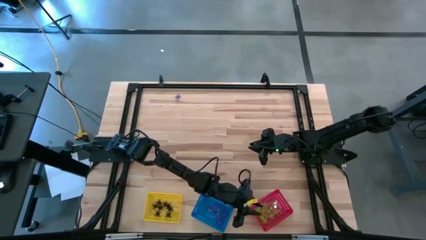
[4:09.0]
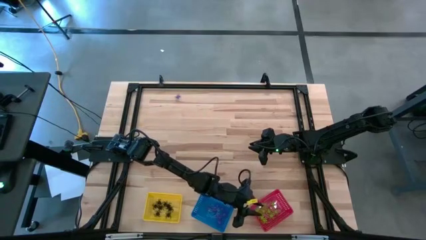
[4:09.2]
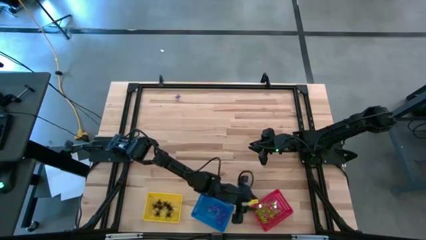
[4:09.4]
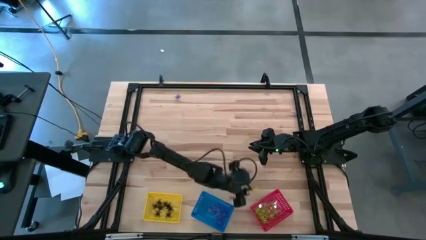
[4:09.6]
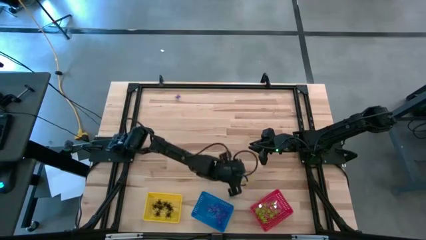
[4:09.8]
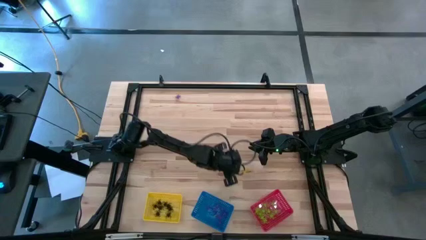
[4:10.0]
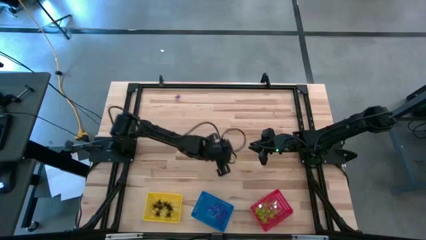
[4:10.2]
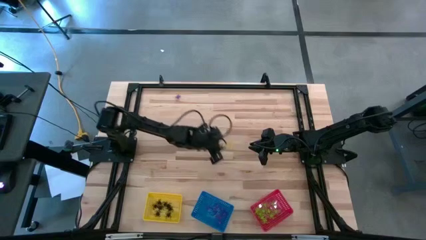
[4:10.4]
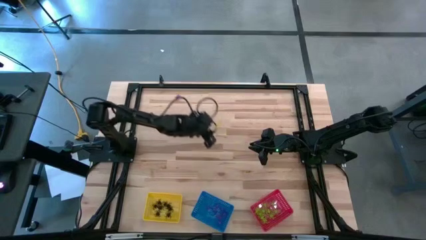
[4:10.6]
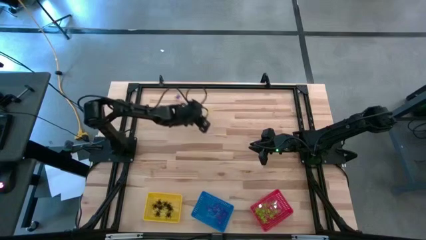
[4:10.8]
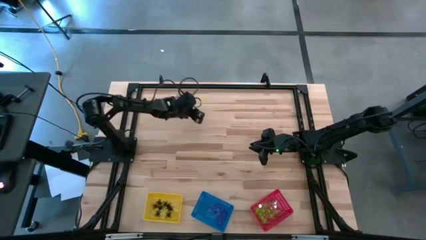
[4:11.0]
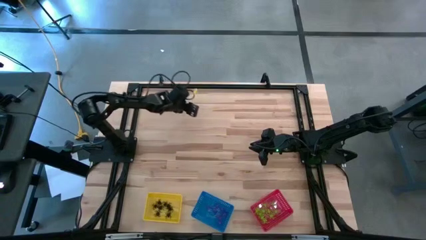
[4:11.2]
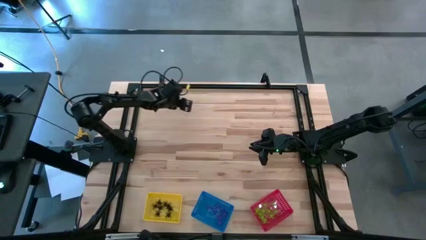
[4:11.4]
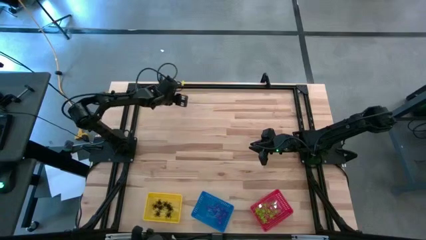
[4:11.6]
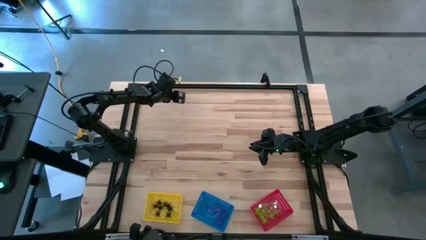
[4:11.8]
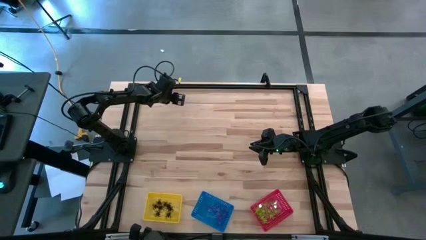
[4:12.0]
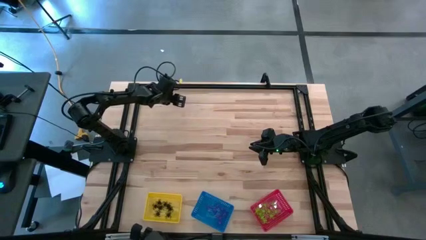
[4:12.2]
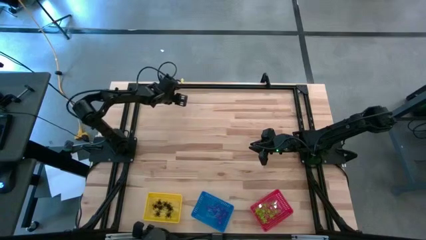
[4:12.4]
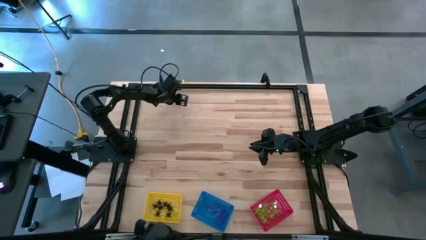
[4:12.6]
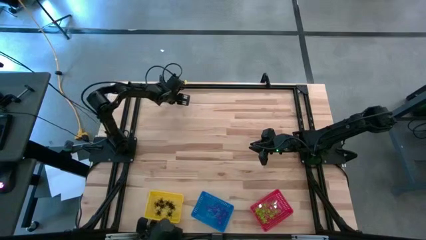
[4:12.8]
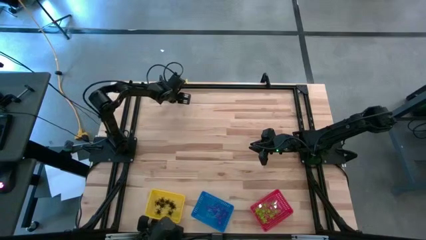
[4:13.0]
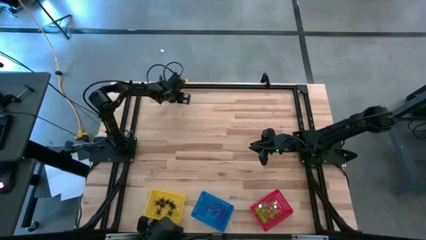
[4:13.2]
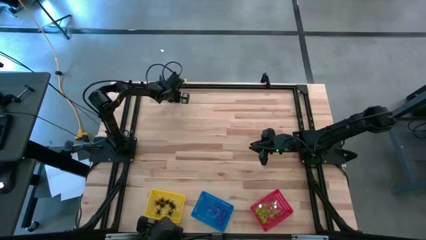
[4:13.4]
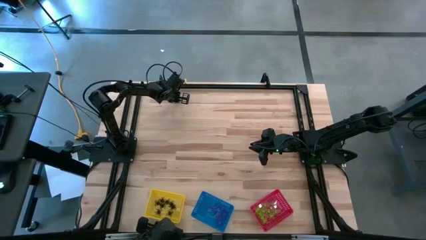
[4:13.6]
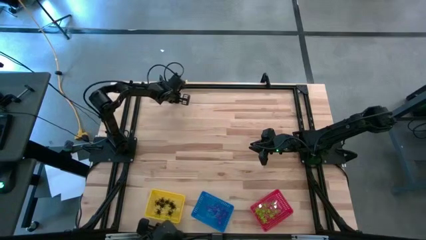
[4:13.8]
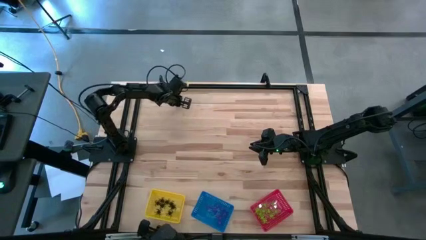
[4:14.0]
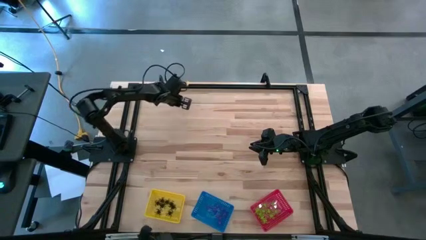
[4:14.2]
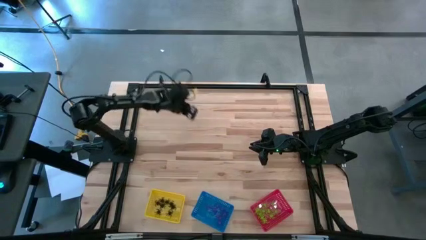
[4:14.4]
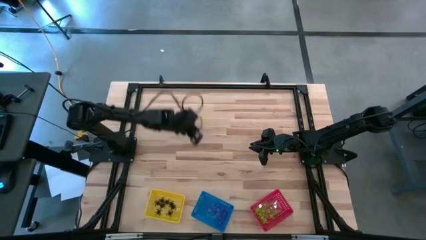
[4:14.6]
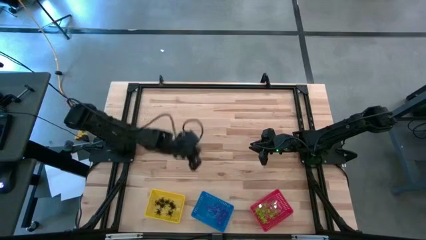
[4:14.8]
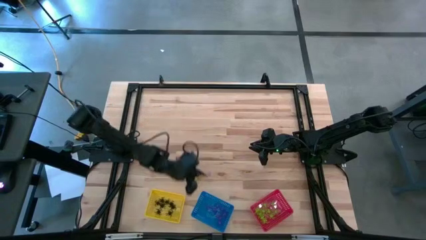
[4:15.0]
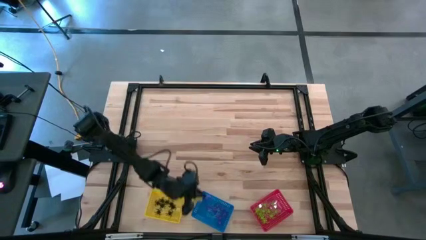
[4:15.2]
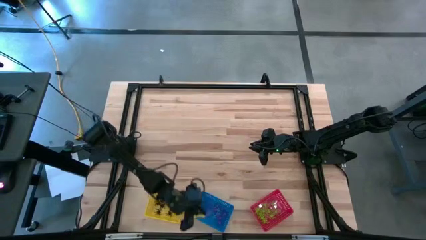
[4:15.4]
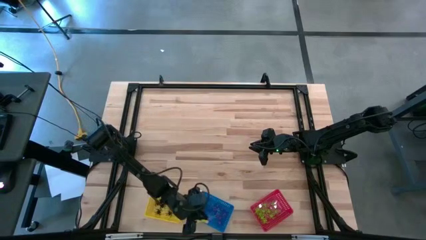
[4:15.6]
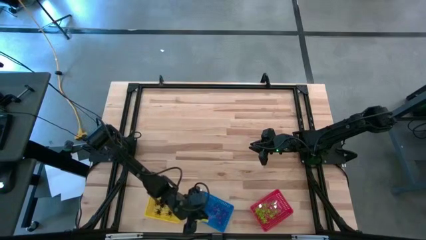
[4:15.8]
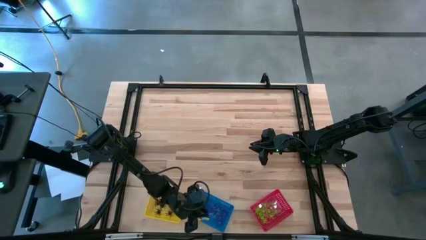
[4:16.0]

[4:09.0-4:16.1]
Task: Sort Halloween decoration
Put the violet spider toy into the blue bin

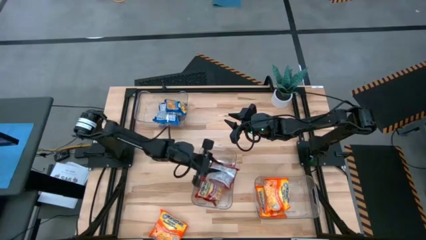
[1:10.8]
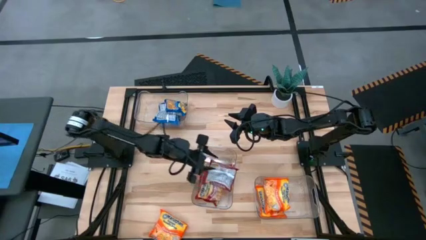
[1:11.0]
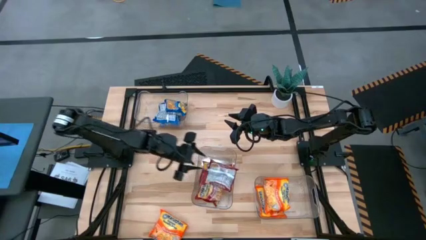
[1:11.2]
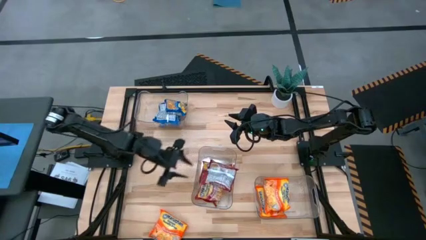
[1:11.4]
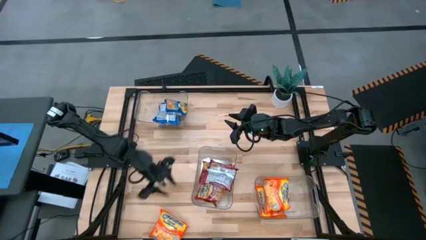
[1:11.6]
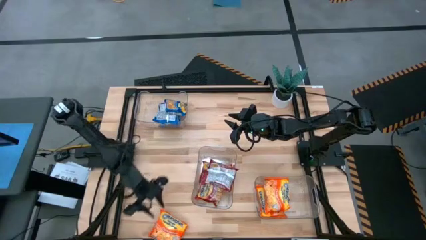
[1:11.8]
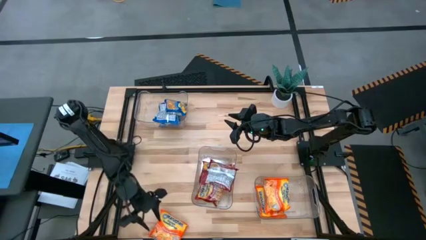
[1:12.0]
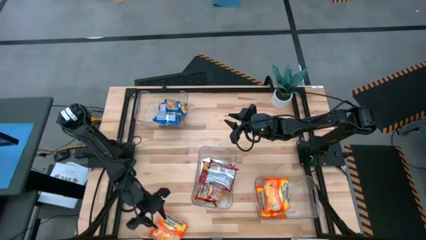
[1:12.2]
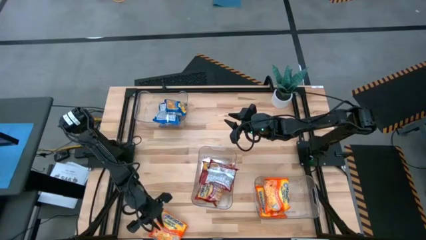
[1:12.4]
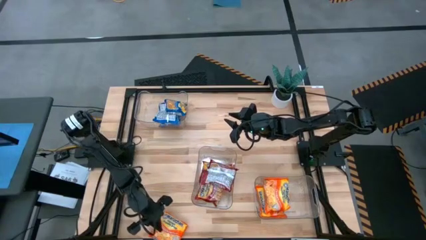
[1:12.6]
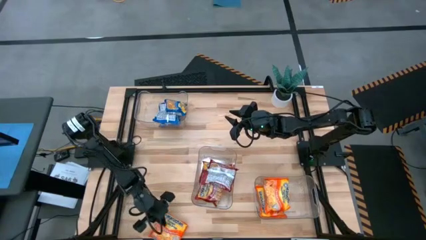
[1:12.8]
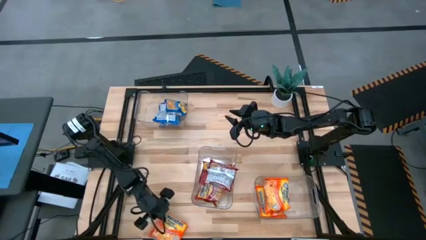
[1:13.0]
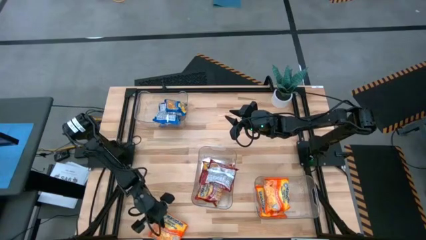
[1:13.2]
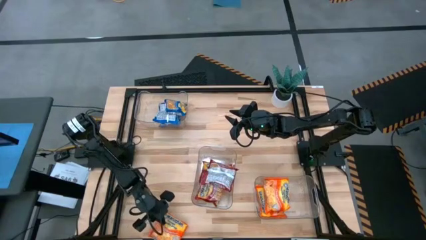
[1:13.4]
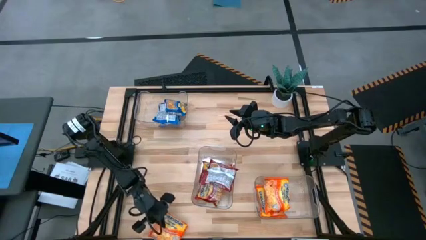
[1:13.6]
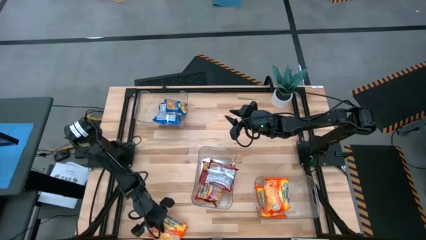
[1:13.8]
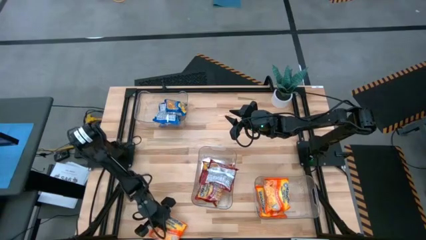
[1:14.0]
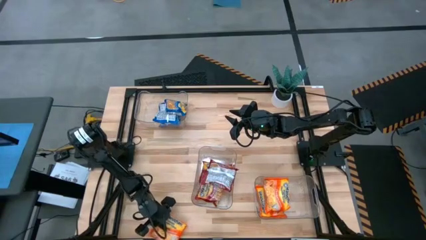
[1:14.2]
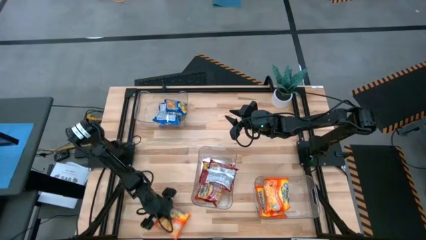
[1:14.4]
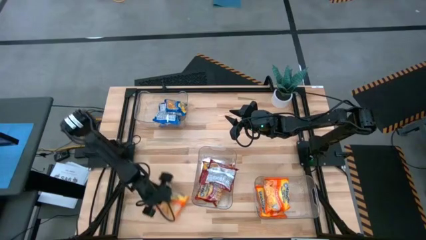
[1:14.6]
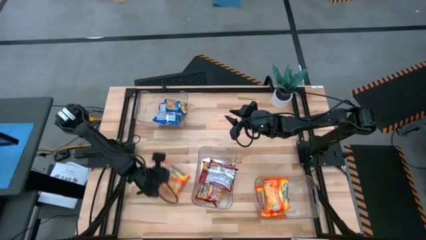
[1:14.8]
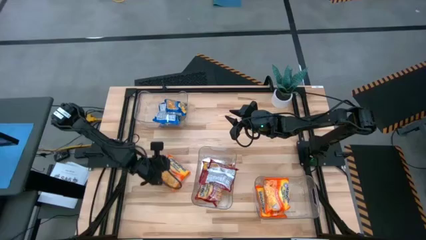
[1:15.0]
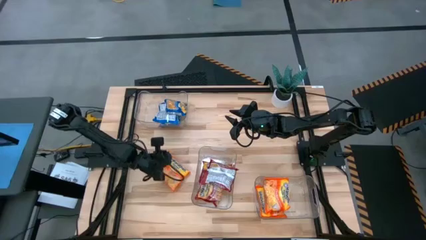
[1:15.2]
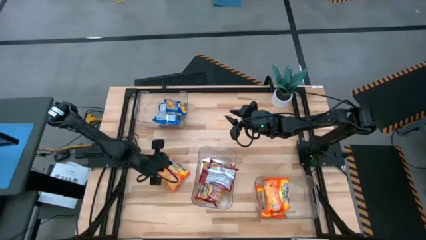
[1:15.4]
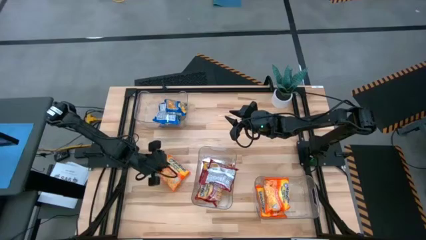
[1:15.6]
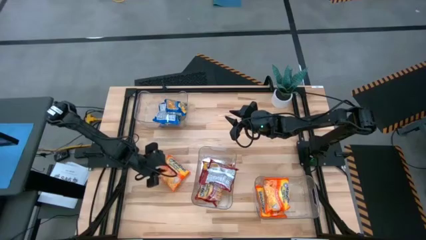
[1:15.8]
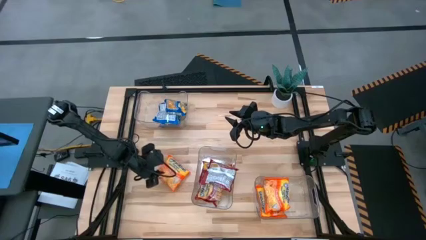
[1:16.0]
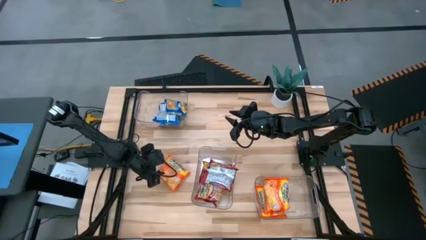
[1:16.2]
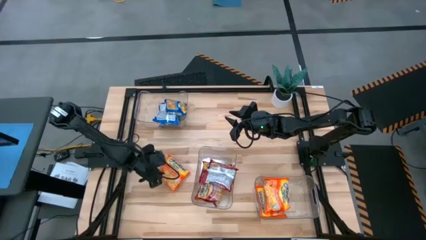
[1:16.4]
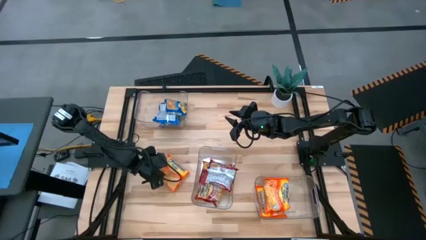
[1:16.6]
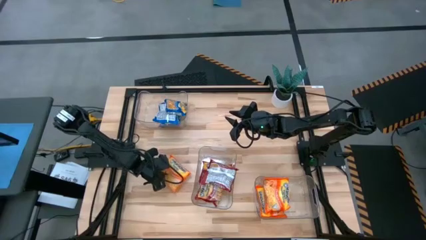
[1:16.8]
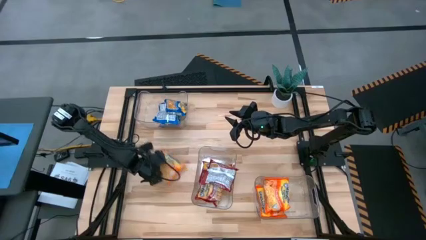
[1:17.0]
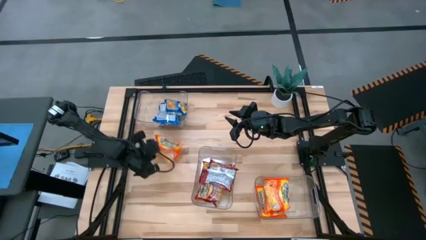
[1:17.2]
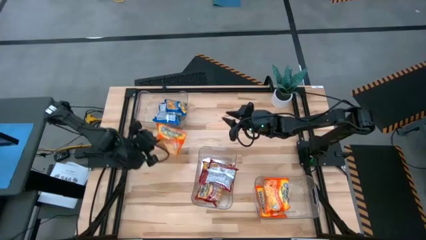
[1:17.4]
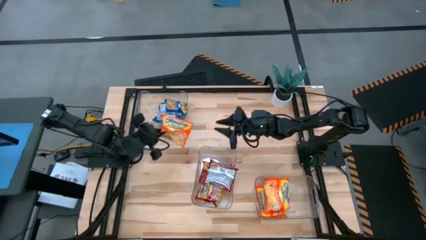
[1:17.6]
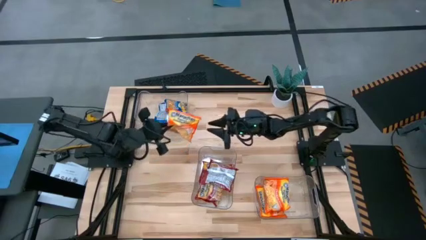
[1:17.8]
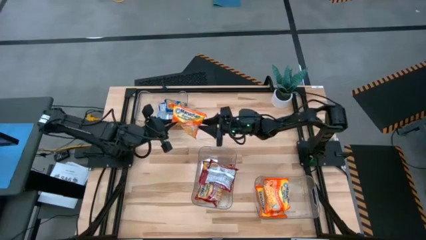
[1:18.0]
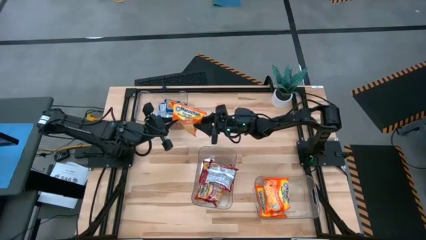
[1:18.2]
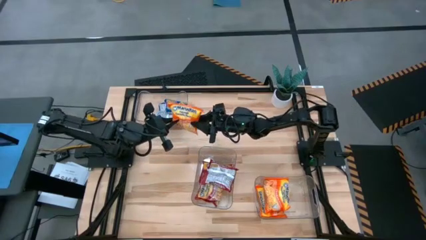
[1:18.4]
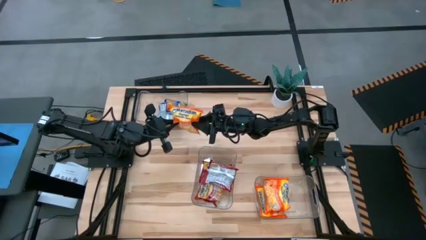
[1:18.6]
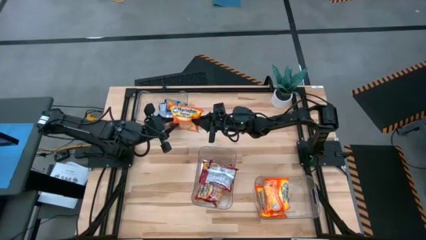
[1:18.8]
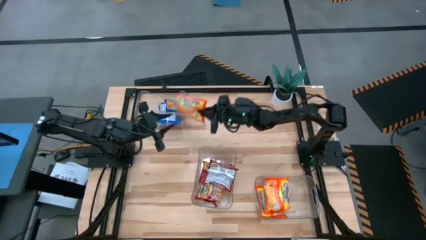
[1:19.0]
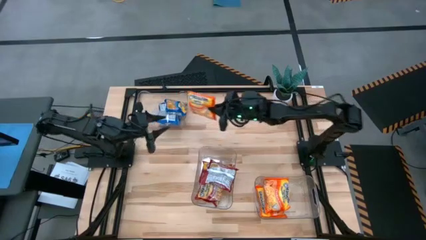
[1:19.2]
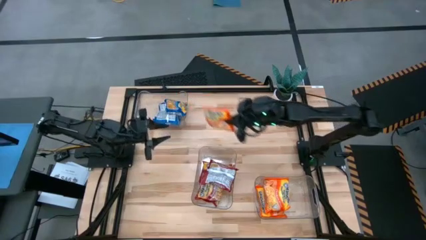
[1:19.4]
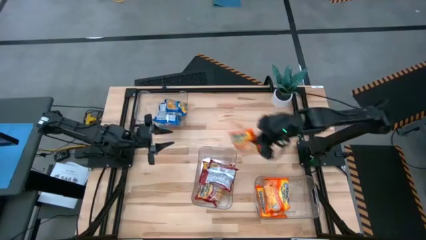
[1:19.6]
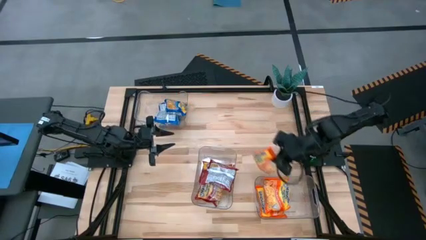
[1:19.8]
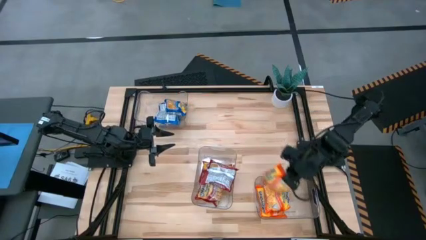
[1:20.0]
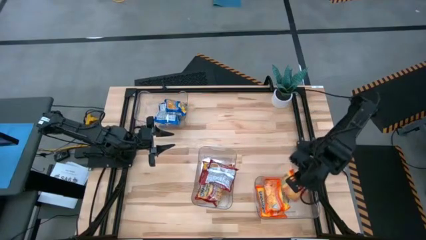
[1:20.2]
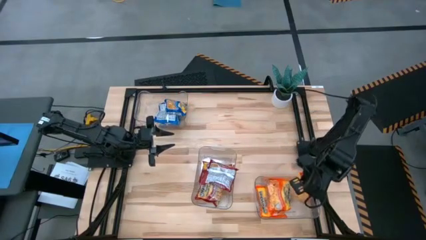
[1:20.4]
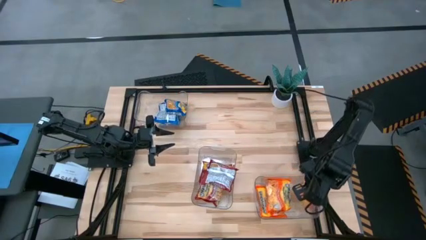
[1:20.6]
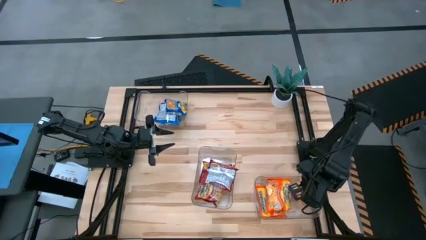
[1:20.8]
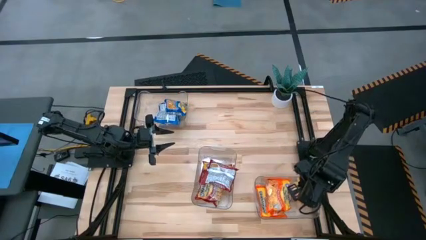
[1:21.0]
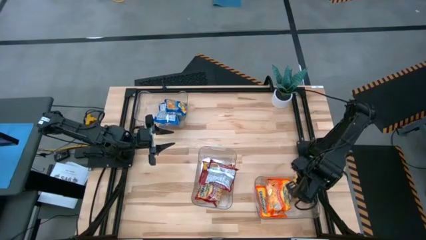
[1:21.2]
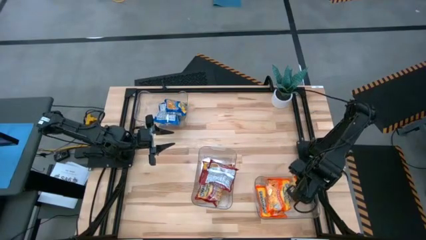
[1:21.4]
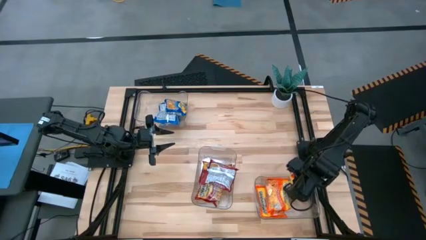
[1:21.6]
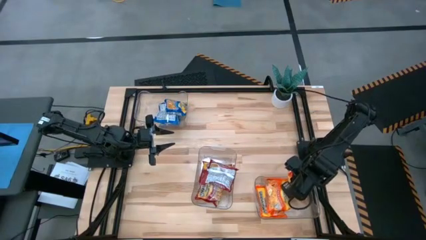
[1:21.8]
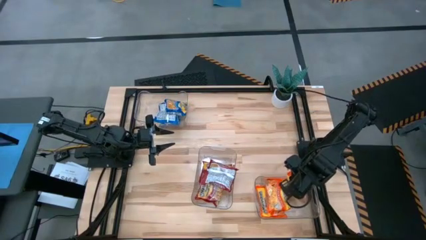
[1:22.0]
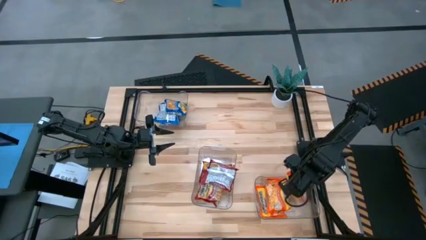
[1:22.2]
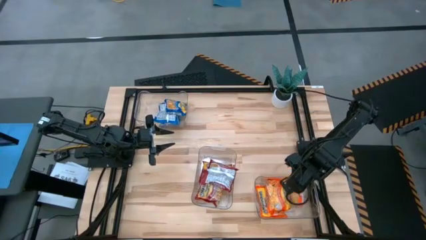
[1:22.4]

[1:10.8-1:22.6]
Task: Sort Maruchan noodles
Put the orange noodle pack into the bottom transparent bin
